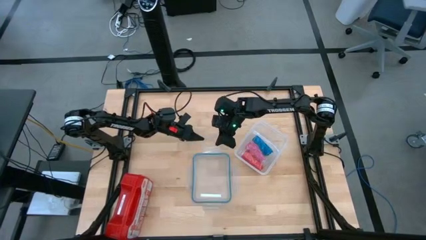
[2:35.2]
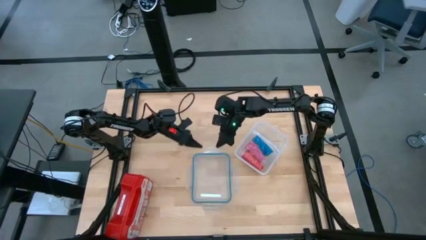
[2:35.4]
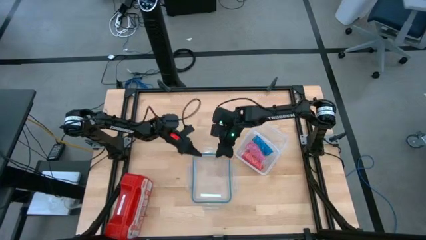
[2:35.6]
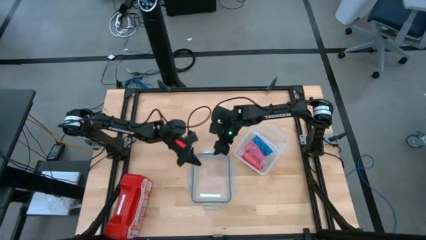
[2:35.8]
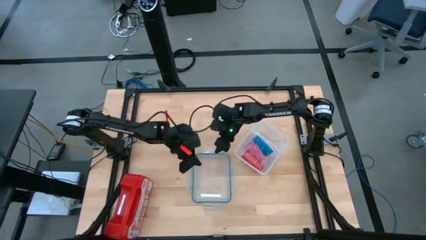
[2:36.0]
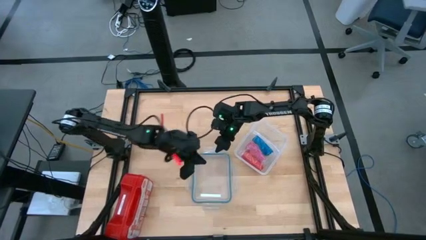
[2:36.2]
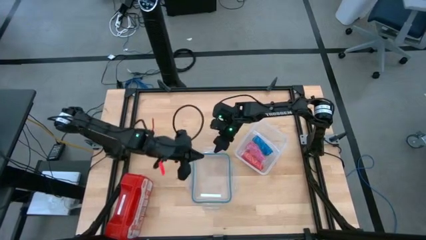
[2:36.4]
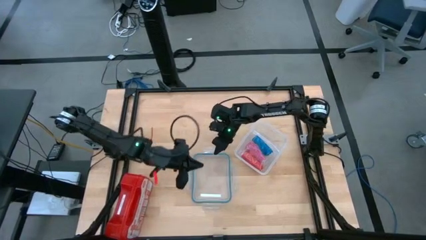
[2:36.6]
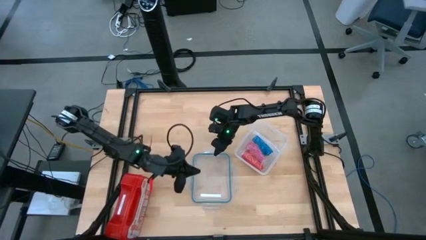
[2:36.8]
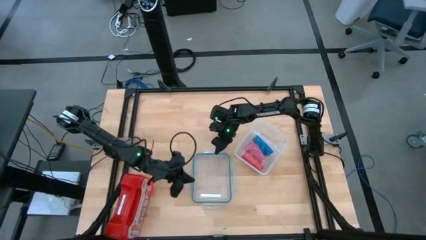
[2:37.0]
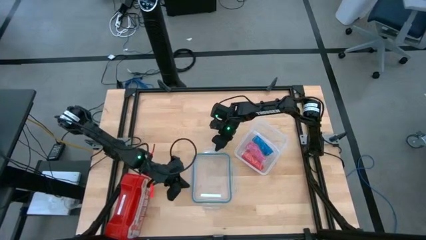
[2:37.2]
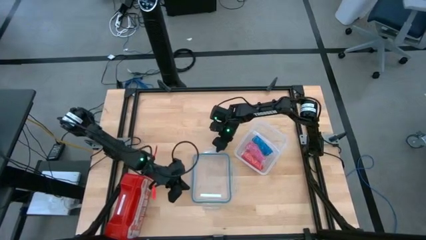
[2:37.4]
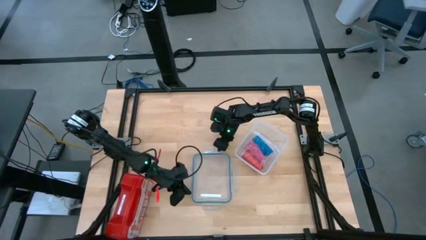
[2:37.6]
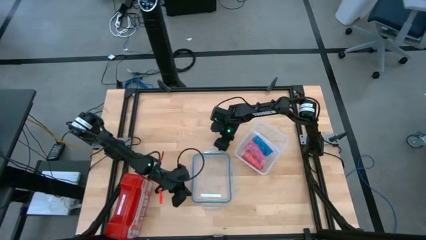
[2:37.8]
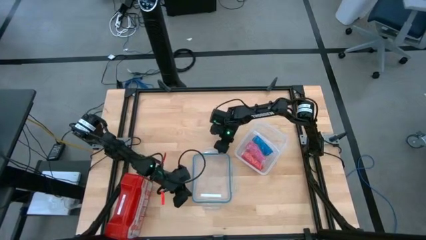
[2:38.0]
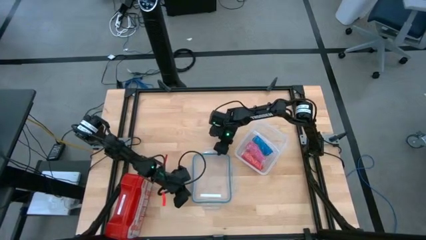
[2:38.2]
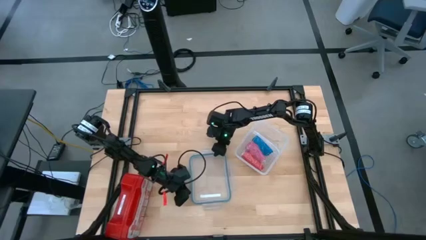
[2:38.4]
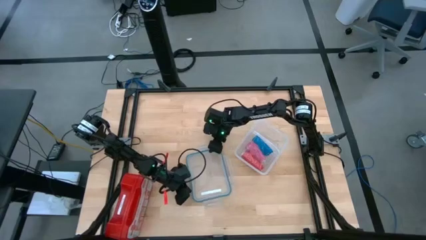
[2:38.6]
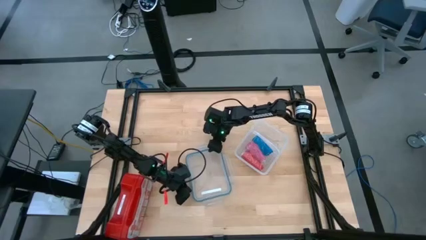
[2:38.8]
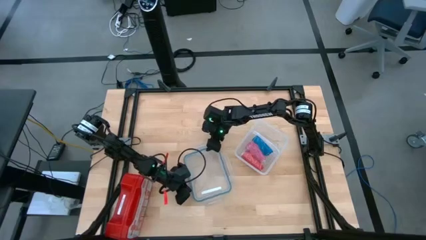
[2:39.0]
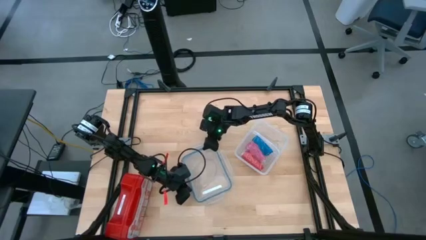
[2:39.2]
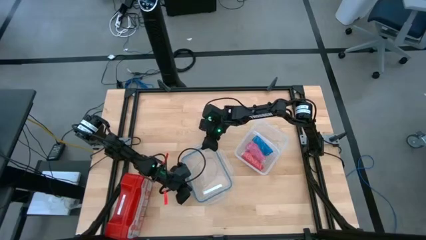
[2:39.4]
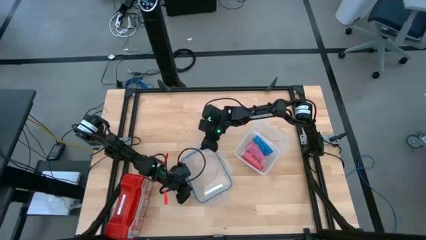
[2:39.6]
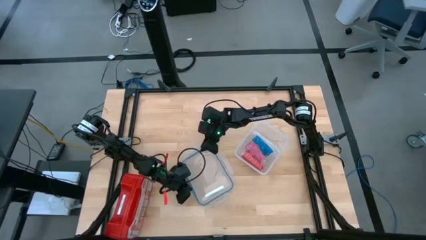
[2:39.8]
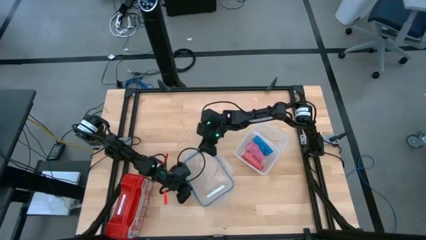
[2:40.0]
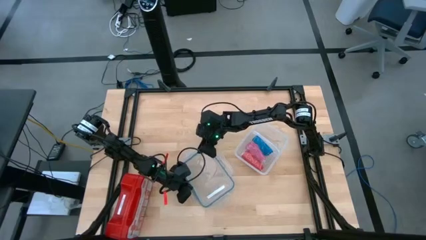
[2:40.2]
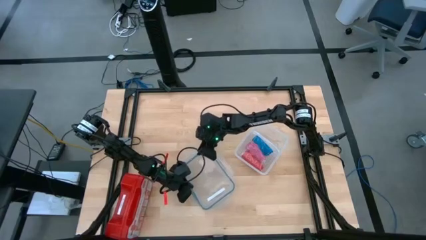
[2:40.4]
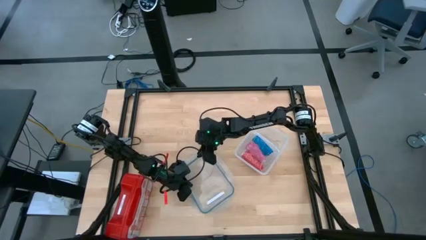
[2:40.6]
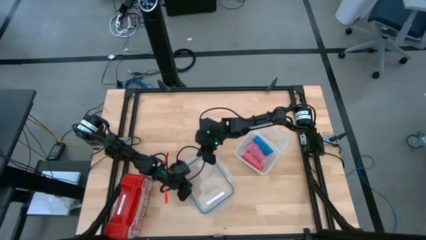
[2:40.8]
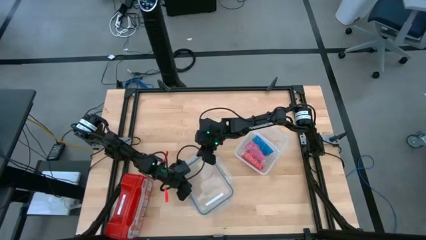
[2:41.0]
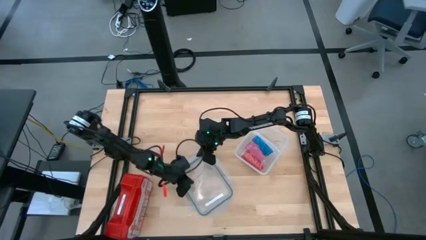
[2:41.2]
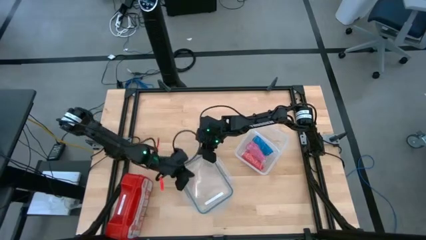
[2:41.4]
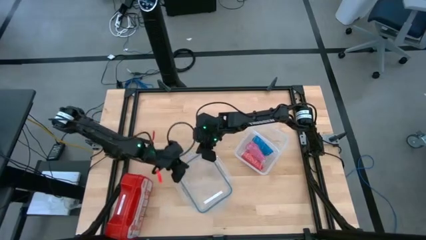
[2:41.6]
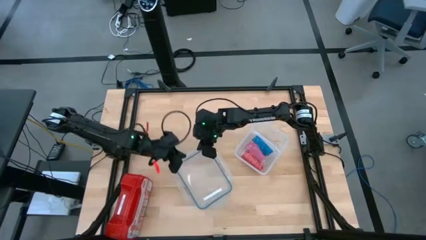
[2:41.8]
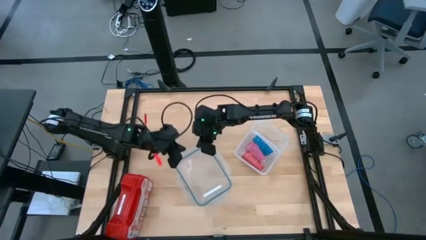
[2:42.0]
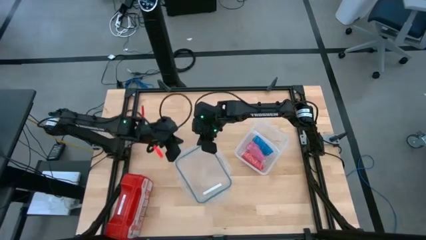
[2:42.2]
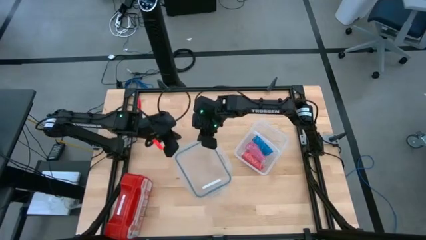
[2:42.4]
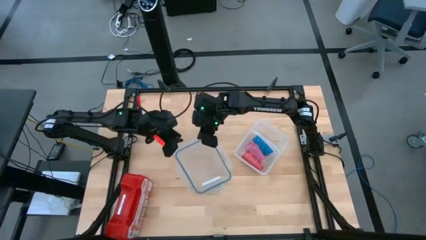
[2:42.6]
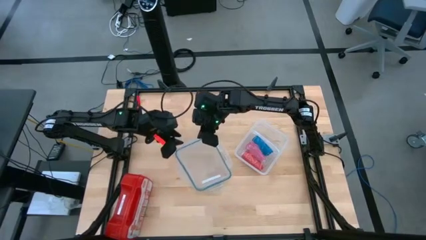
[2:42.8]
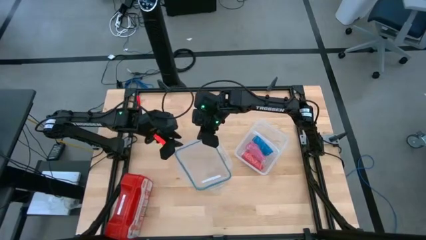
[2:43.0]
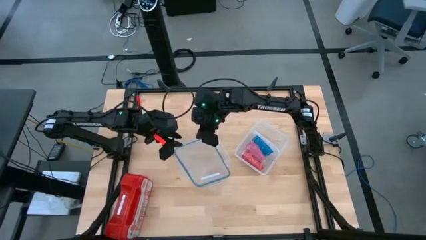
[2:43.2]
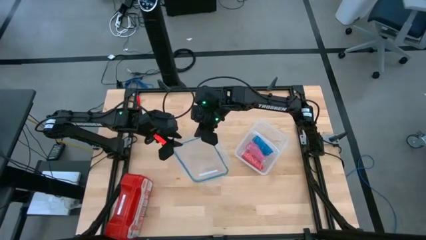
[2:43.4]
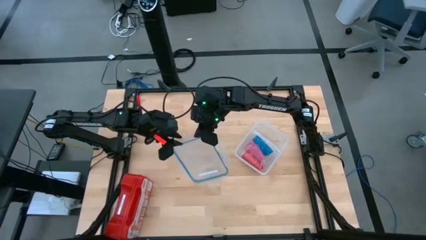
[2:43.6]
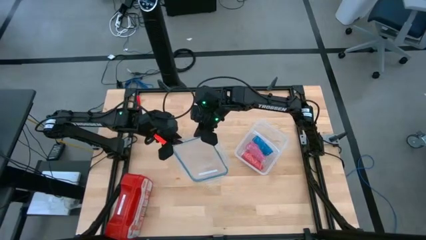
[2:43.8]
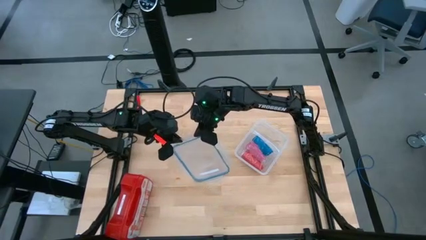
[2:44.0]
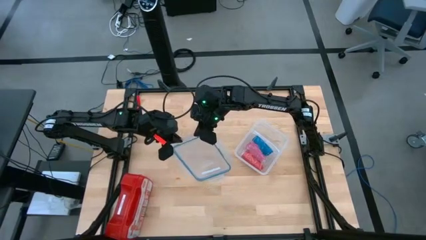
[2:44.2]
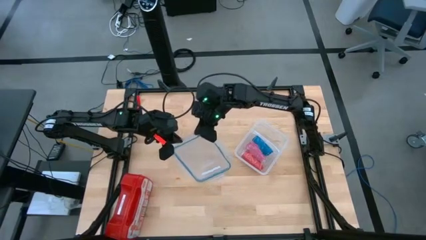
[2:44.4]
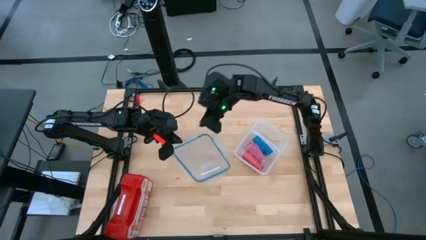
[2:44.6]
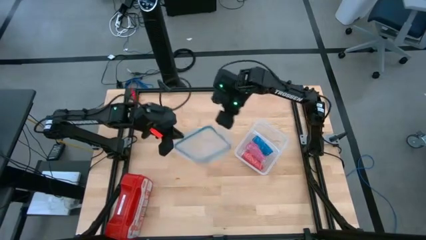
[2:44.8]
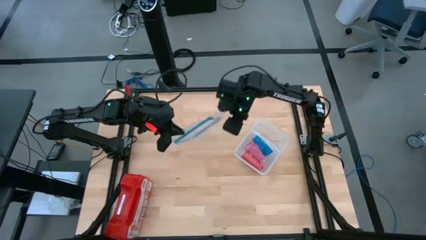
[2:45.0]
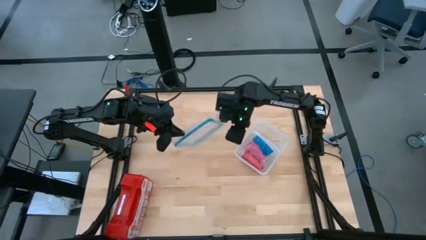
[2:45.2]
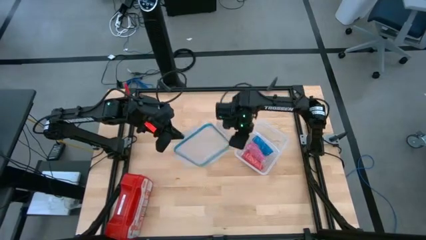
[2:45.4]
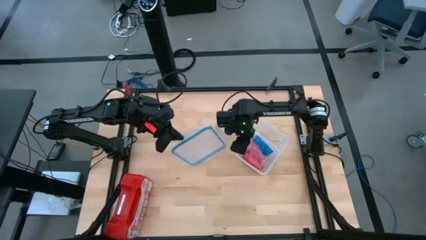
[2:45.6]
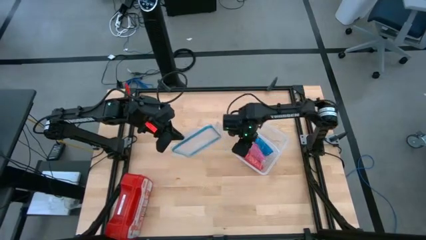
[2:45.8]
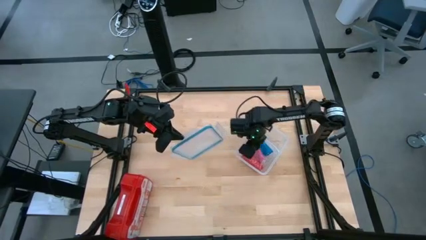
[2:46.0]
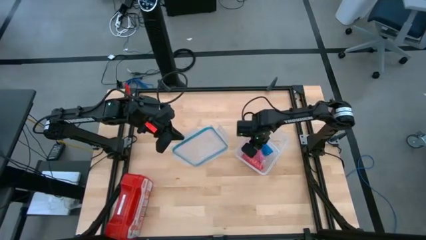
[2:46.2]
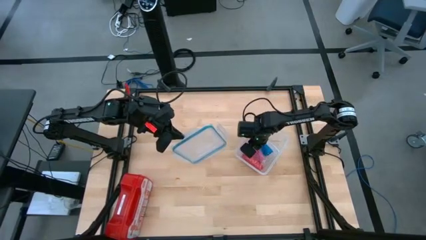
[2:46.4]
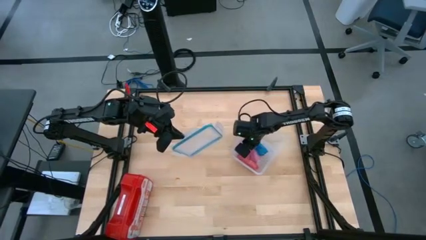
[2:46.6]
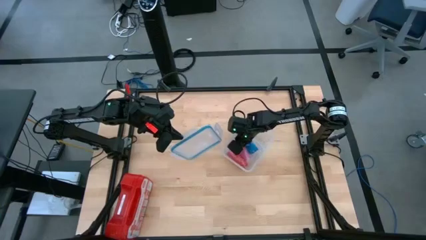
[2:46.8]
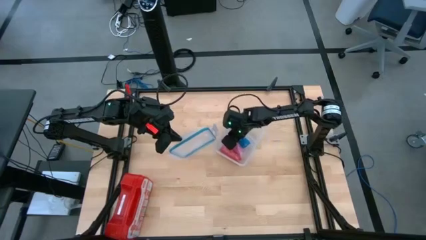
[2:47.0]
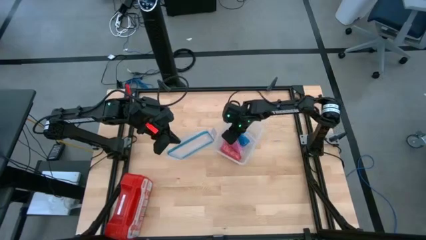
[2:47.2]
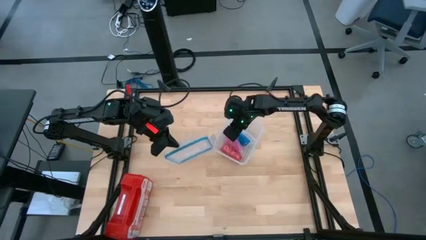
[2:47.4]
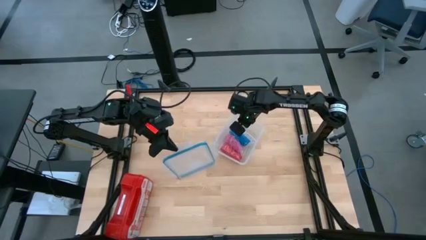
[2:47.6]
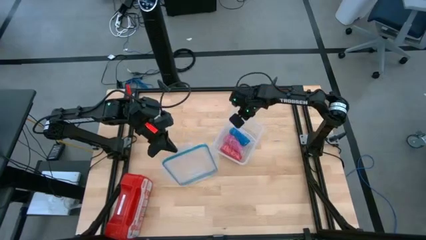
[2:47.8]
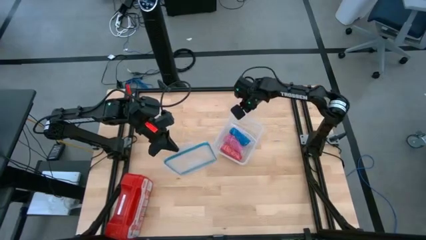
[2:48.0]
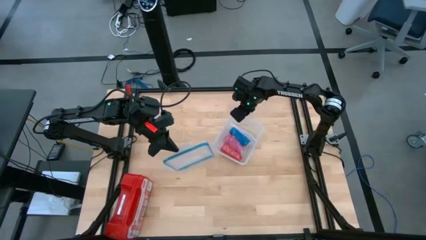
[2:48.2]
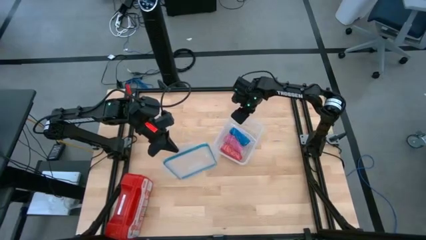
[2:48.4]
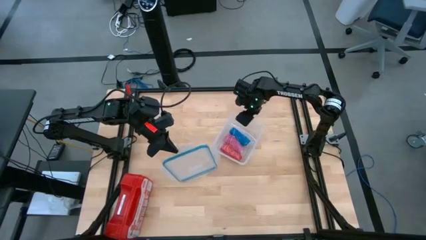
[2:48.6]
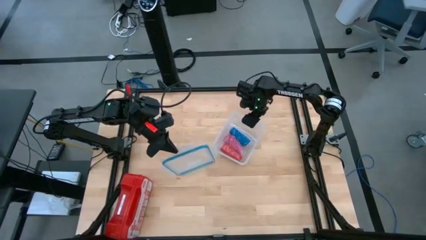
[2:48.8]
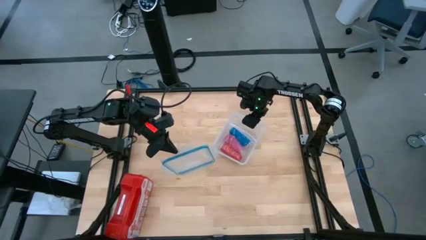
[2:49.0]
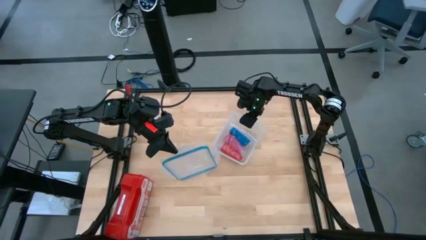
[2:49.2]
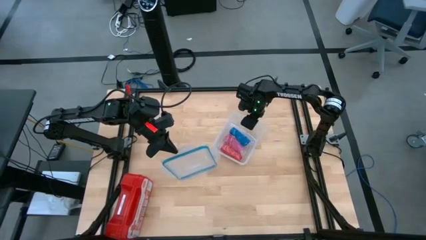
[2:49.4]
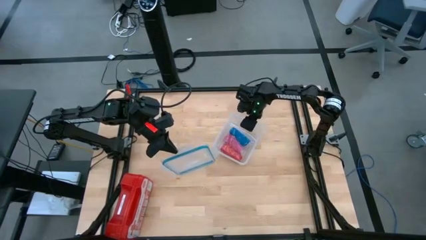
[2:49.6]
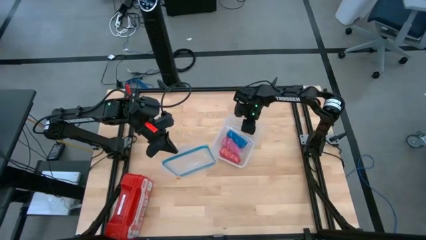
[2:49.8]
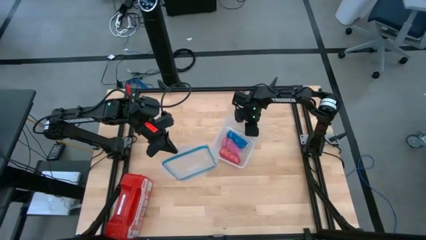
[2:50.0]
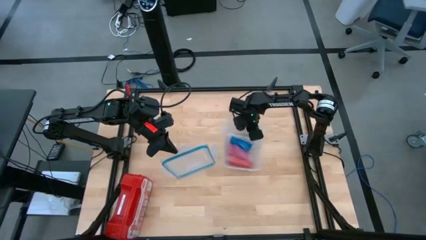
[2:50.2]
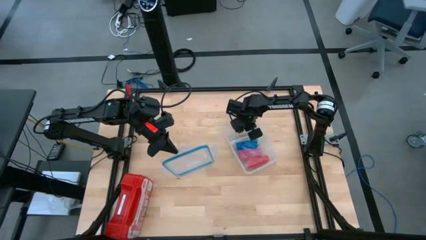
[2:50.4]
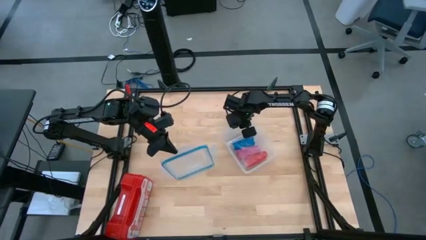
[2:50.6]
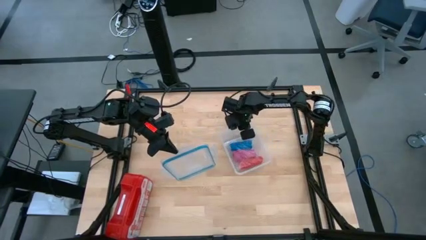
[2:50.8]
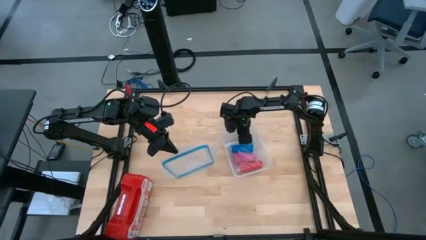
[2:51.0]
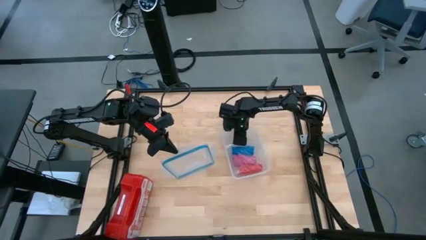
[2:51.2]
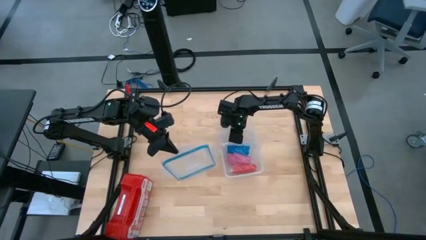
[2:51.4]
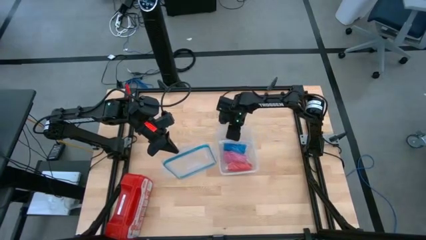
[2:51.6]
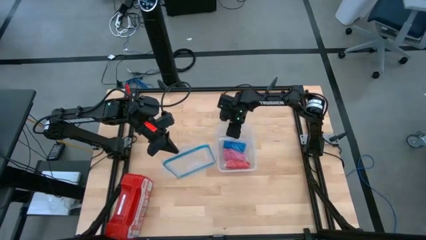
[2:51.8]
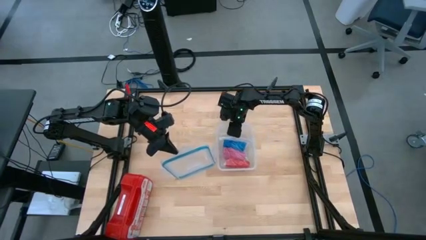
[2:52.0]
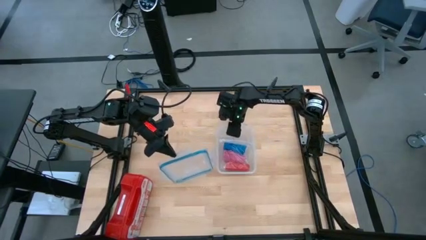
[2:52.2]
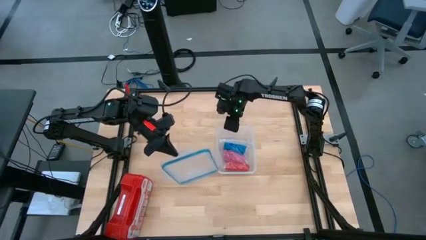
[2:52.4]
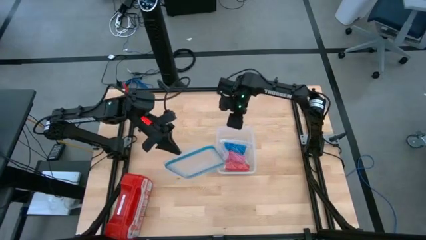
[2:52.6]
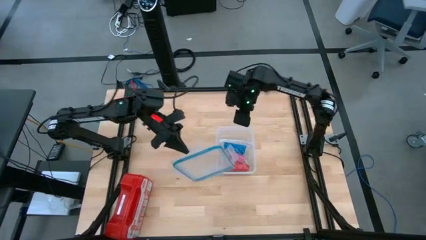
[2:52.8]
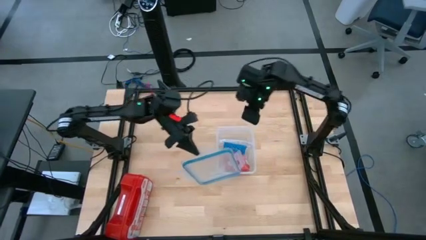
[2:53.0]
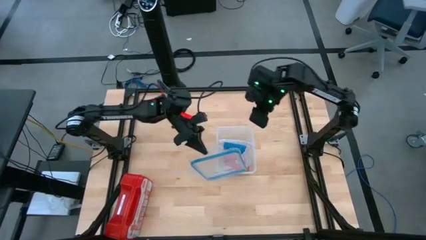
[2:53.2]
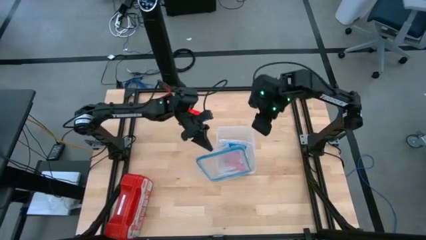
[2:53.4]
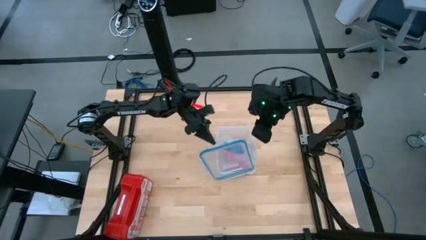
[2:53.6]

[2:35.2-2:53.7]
Task: Roll bandage
Close the lid of the tupperware
